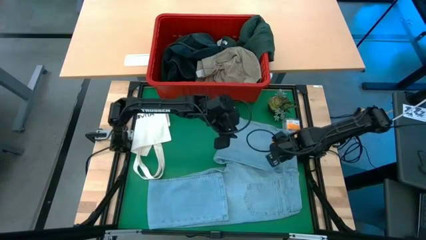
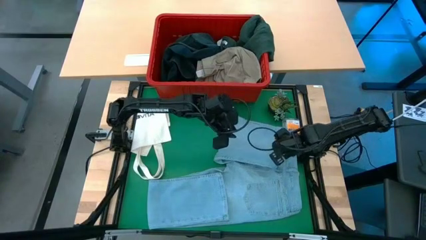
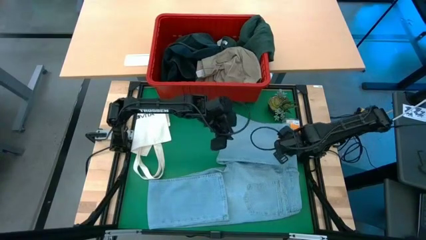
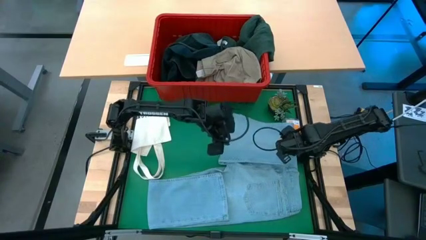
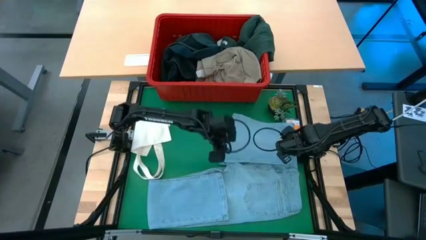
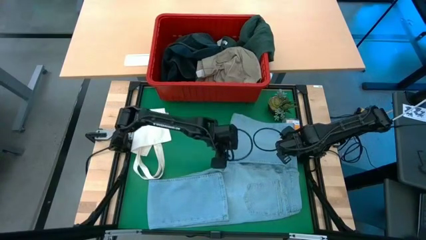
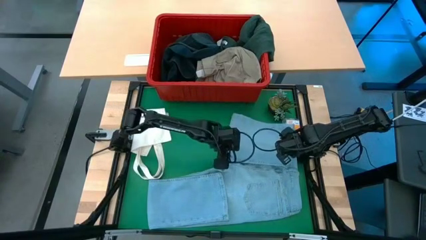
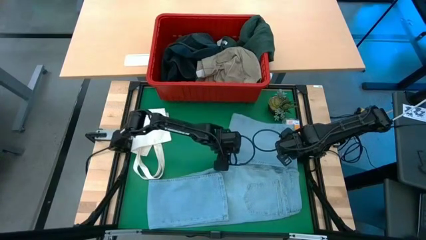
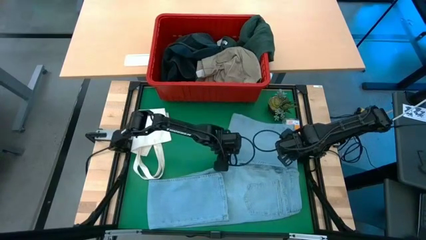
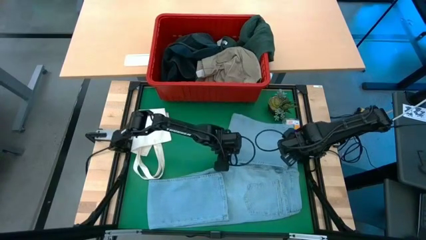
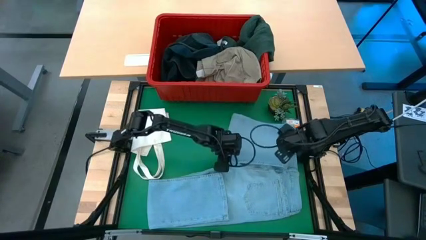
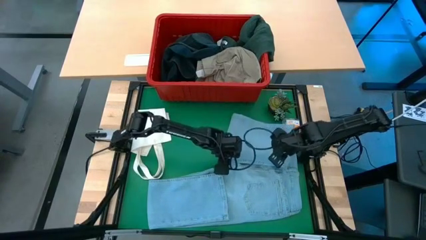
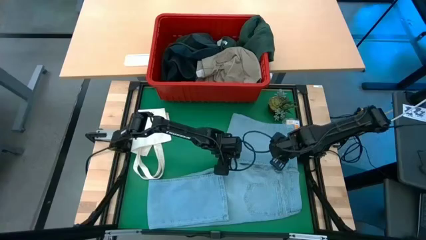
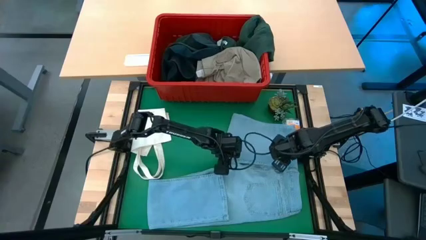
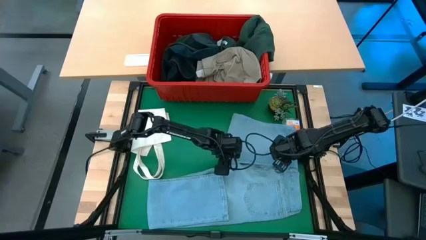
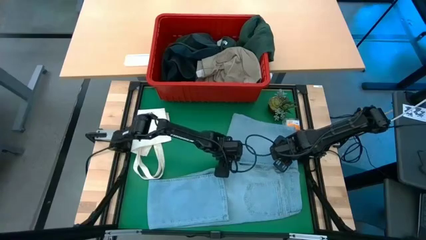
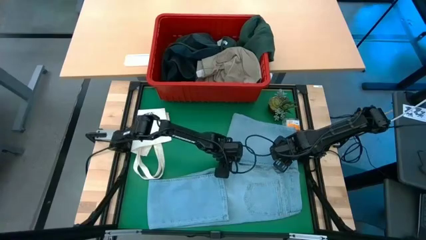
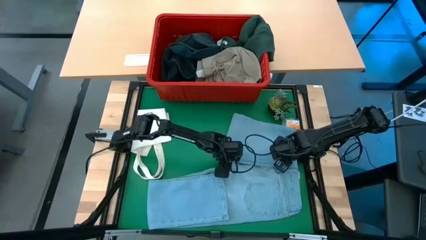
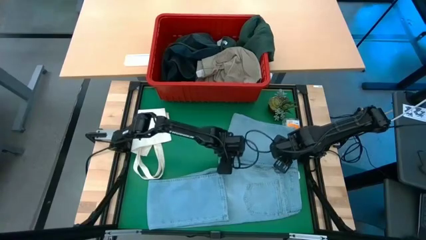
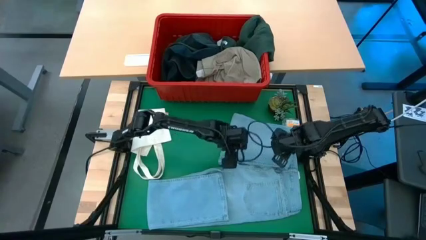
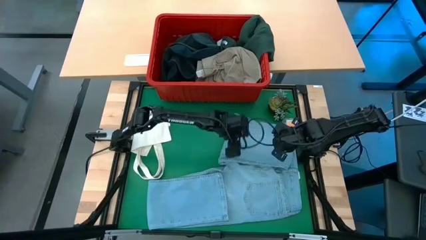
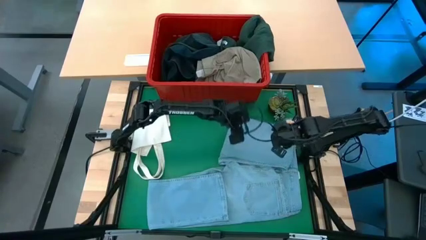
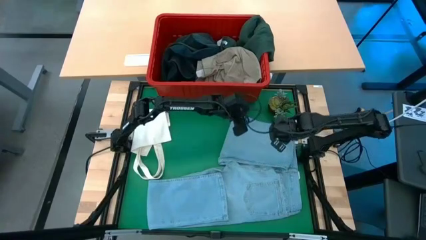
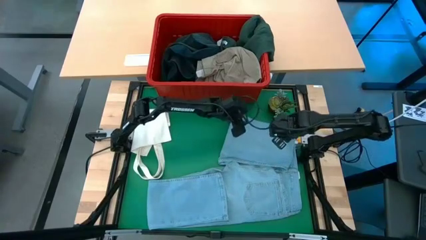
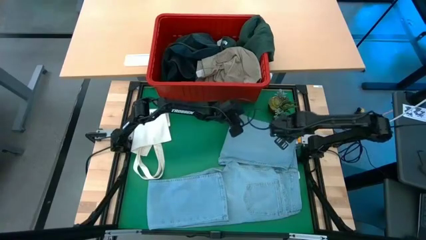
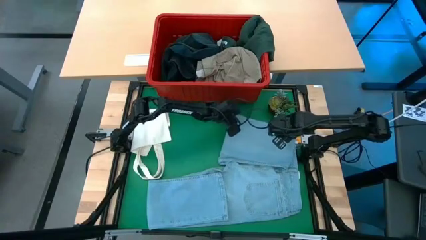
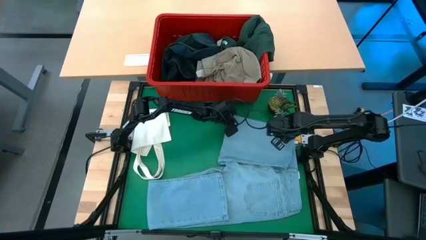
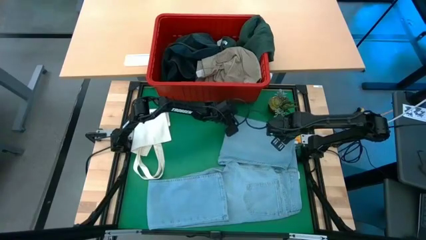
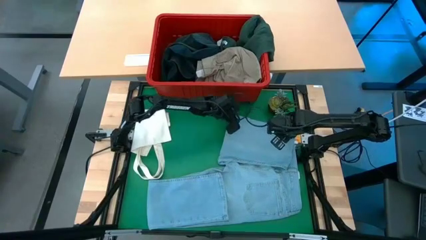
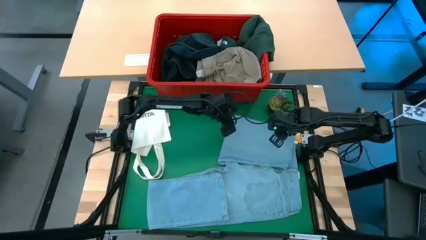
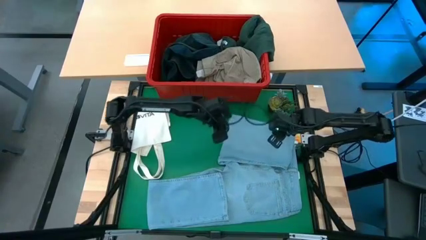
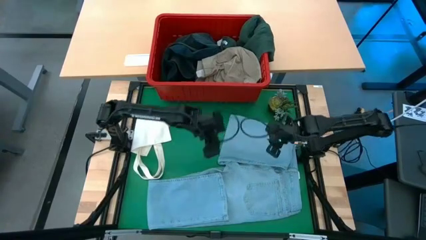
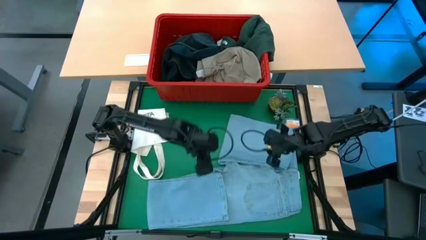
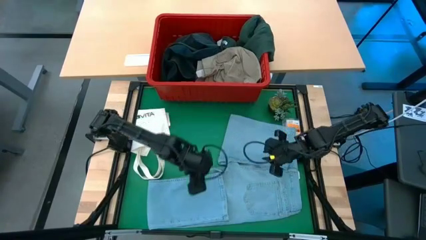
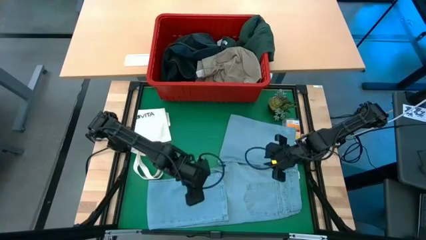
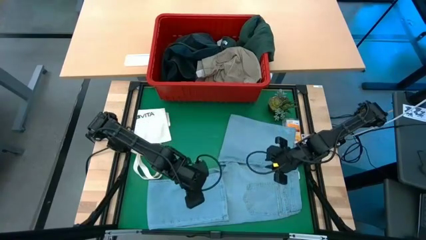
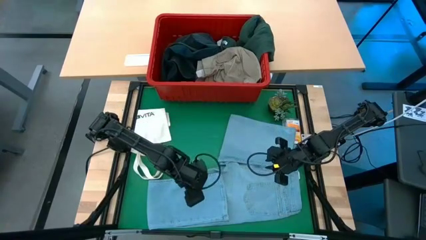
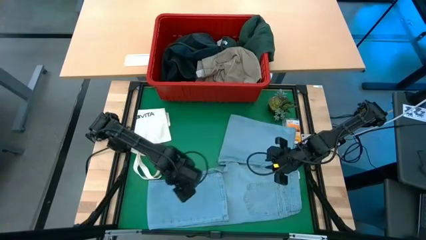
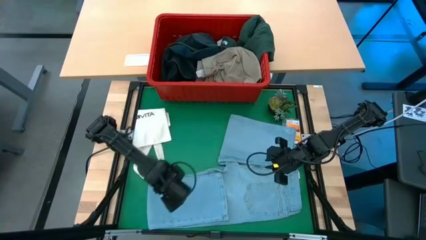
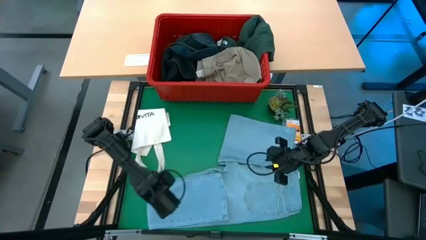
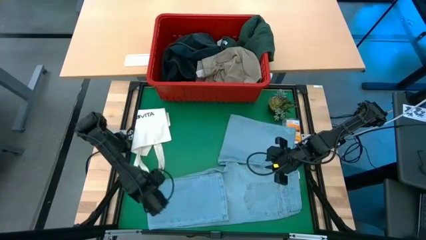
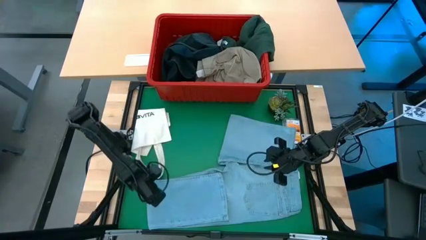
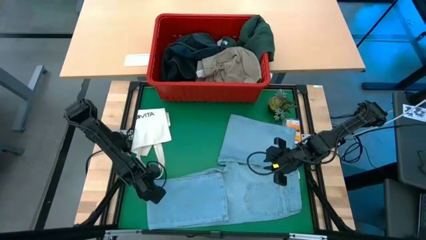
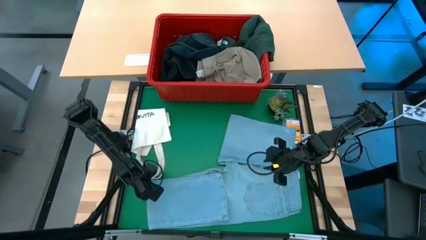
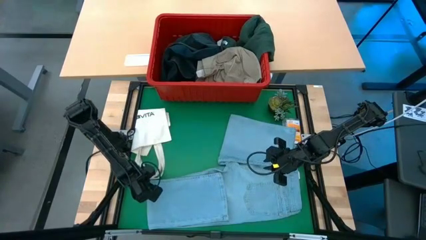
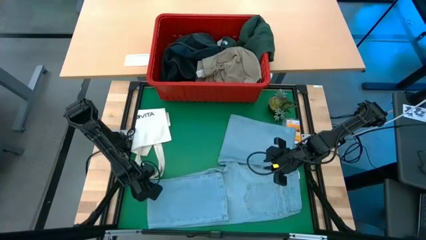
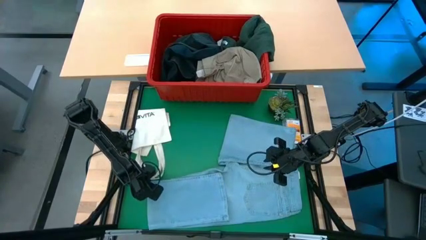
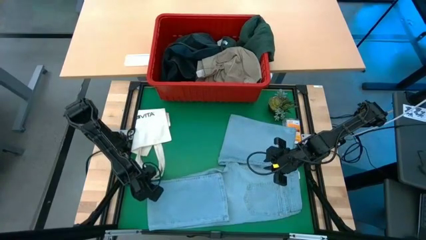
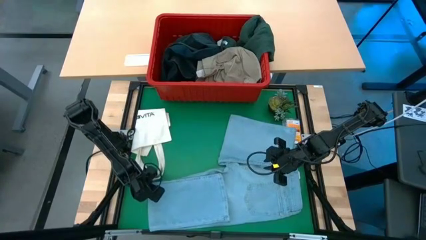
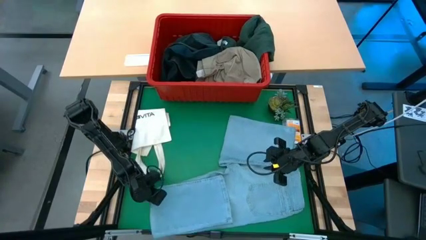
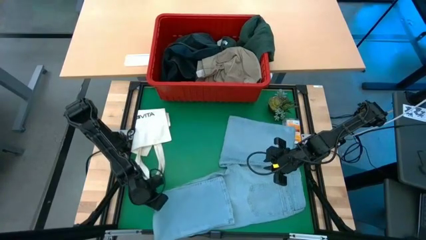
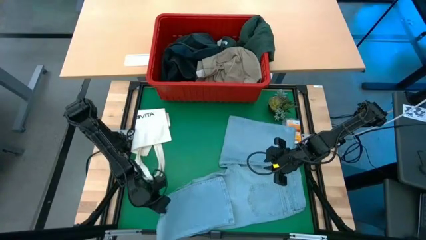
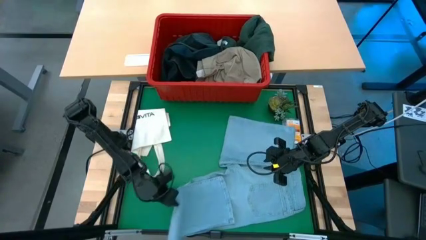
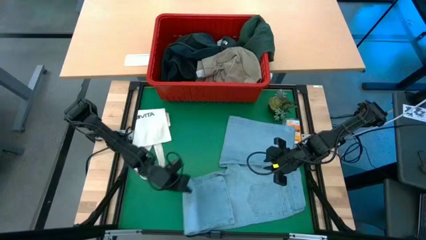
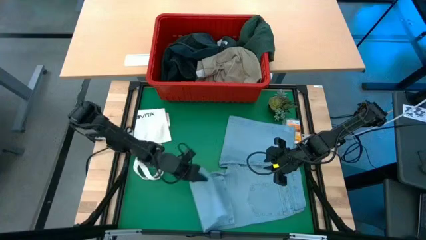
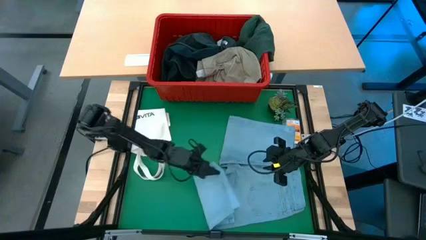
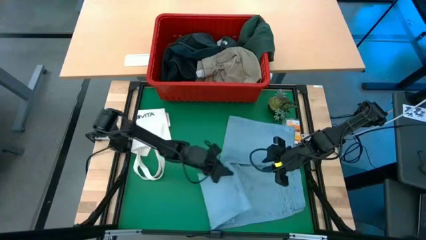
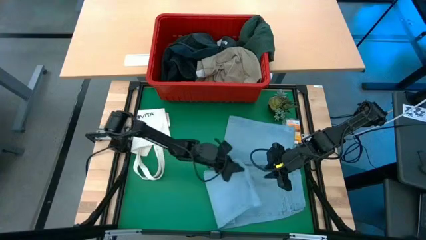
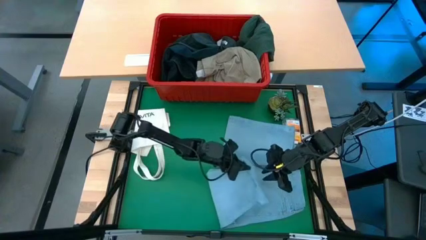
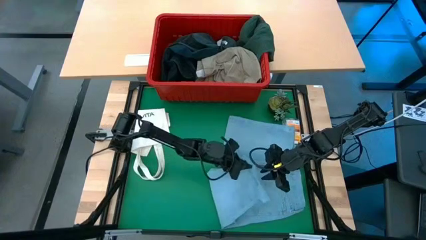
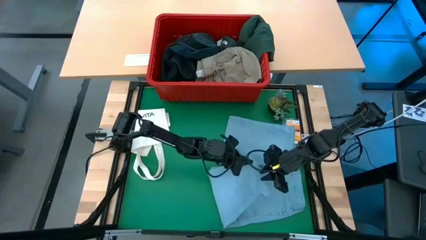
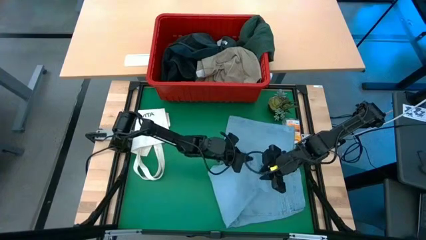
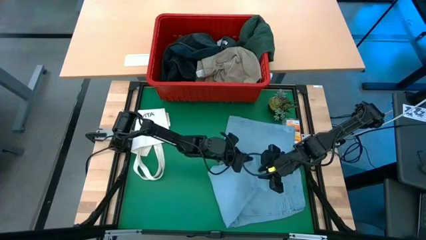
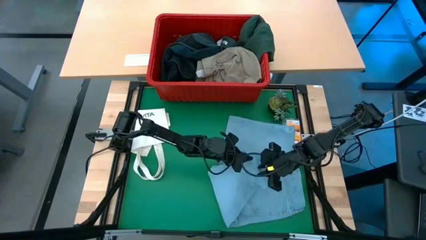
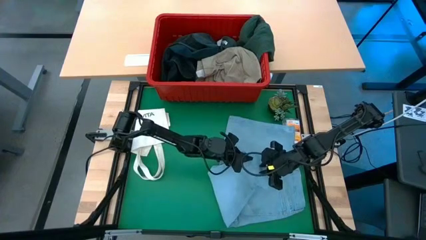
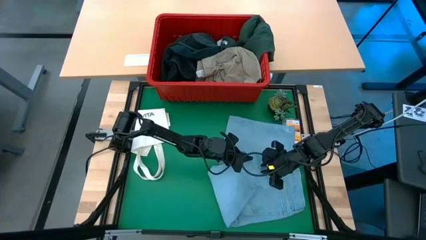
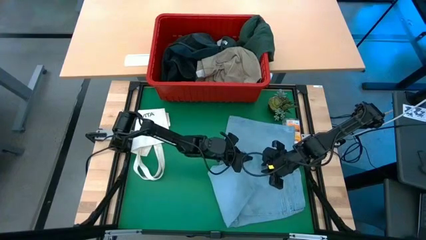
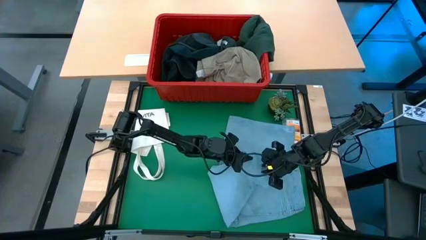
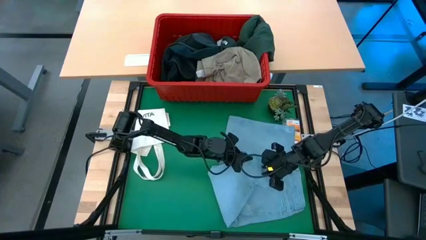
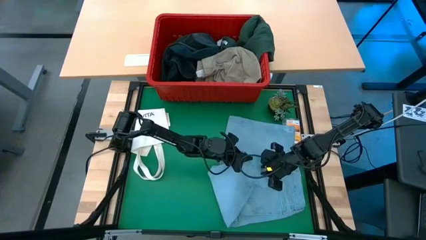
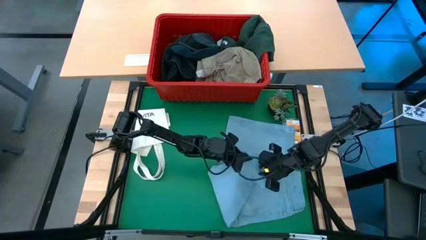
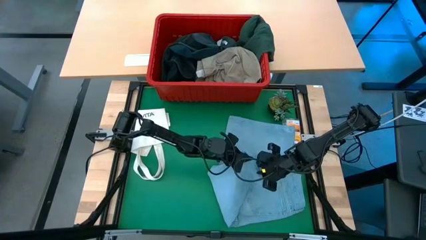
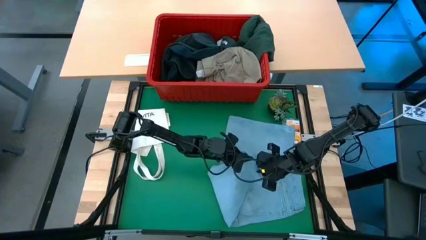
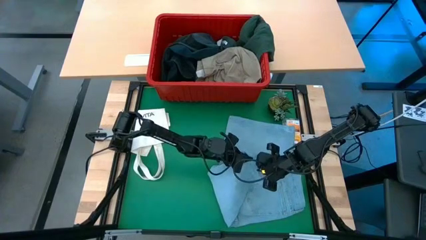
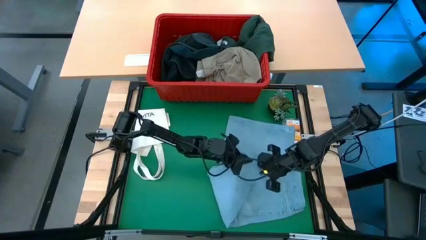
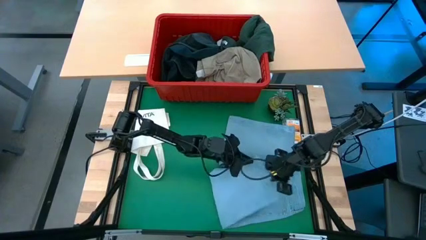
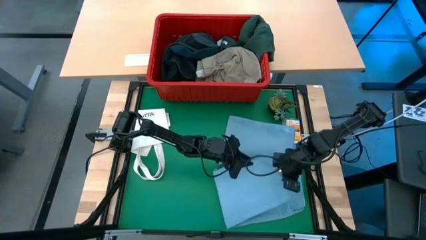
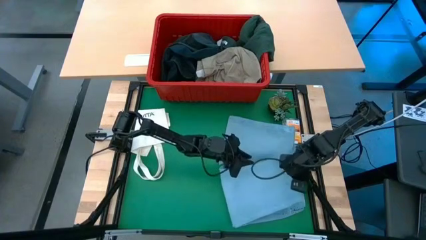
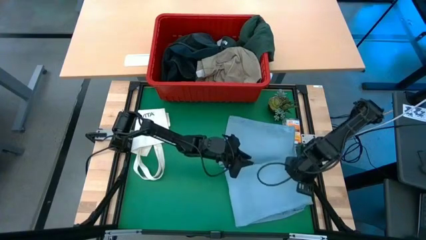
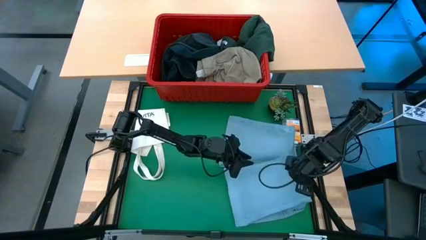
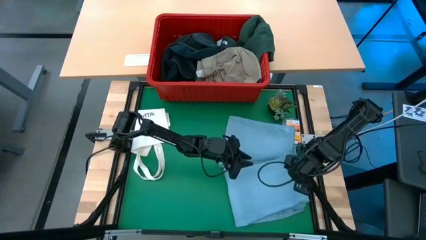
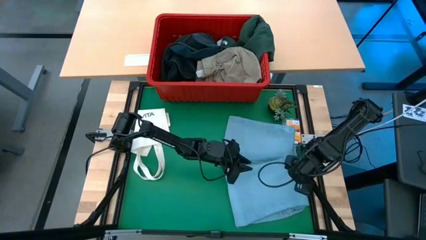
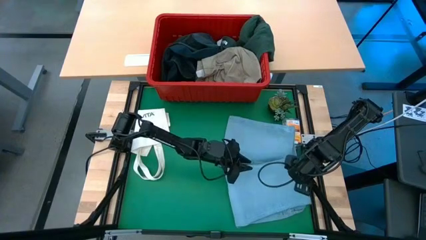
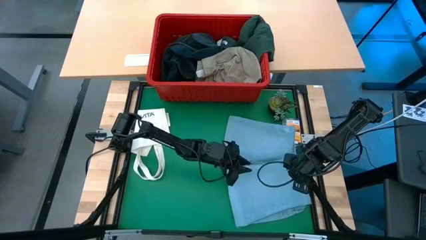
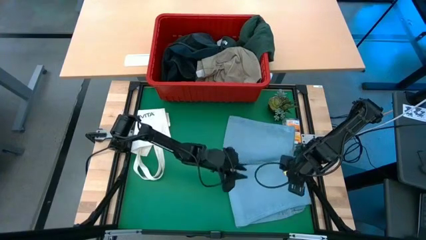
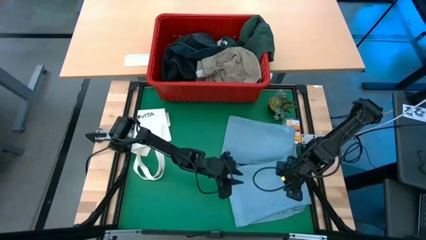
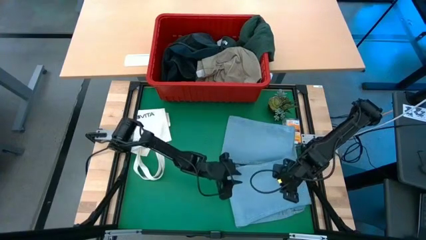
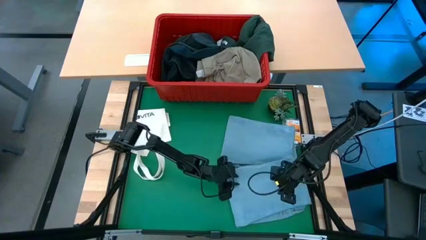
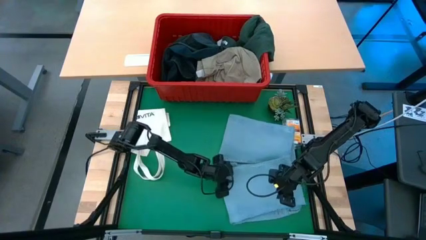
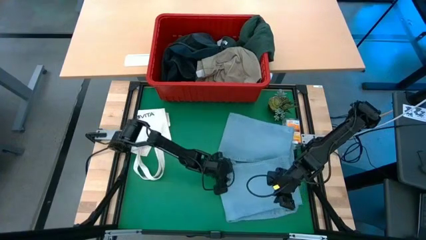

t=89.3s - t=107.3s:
Task: Fold Laundry from Bin
Fold the light blue jeans
